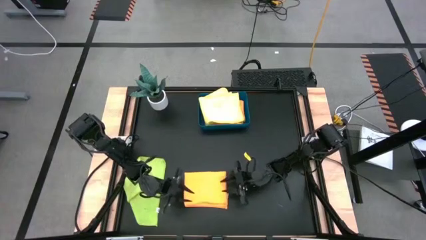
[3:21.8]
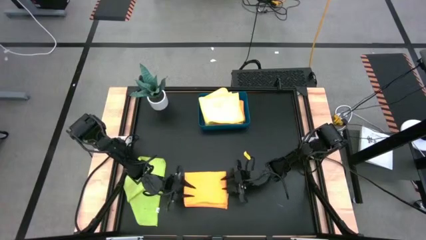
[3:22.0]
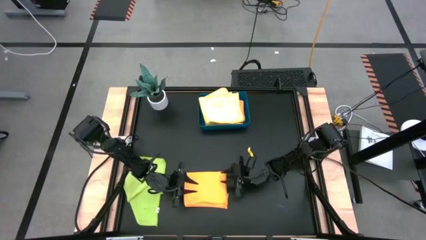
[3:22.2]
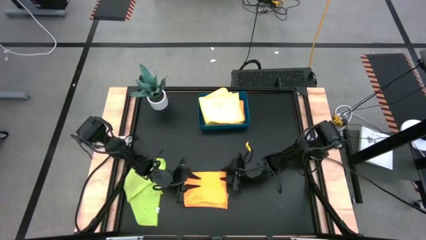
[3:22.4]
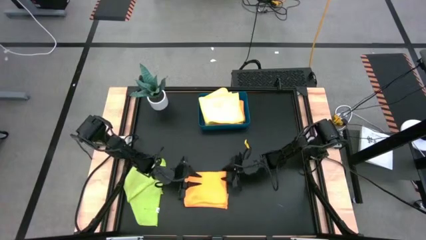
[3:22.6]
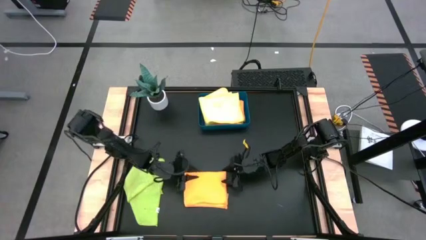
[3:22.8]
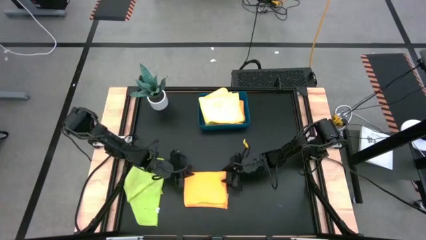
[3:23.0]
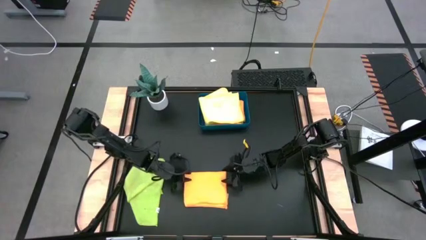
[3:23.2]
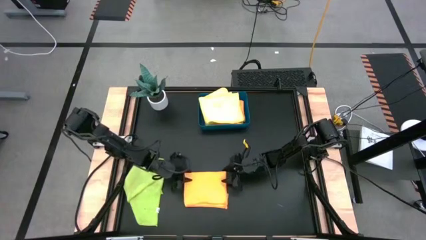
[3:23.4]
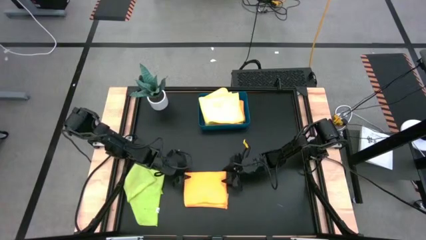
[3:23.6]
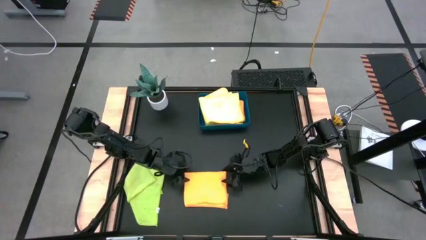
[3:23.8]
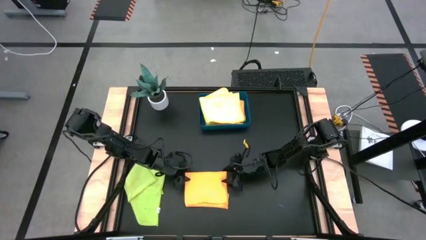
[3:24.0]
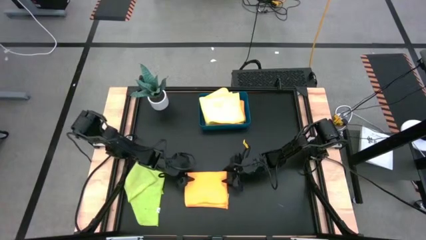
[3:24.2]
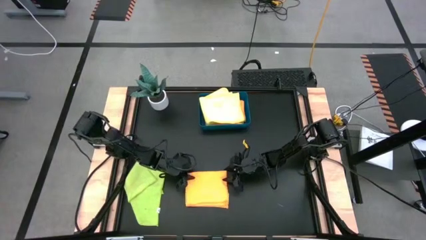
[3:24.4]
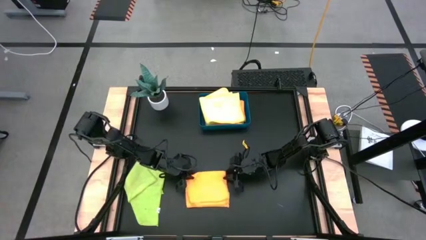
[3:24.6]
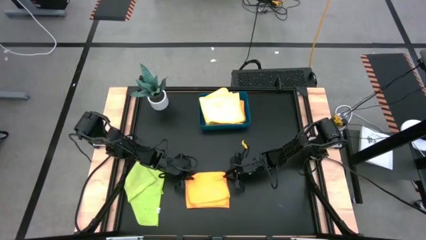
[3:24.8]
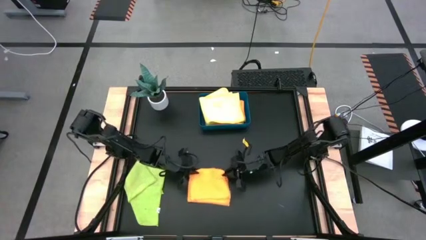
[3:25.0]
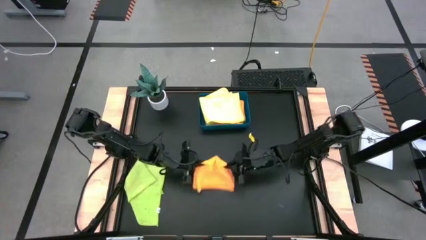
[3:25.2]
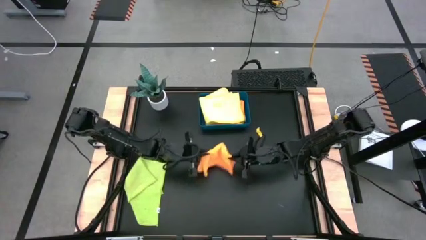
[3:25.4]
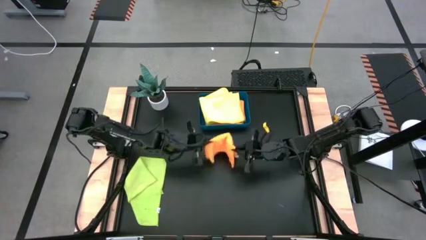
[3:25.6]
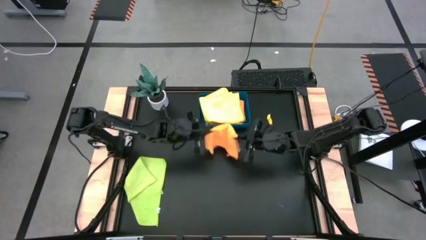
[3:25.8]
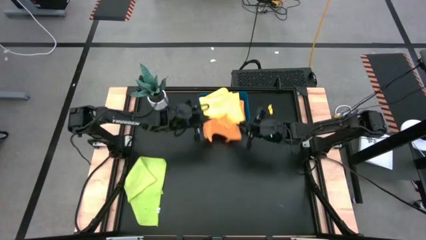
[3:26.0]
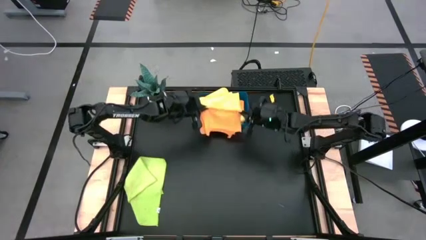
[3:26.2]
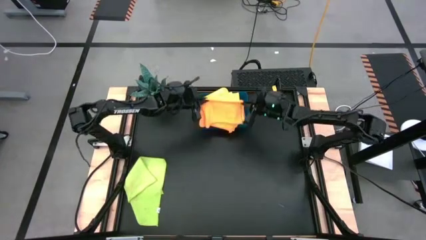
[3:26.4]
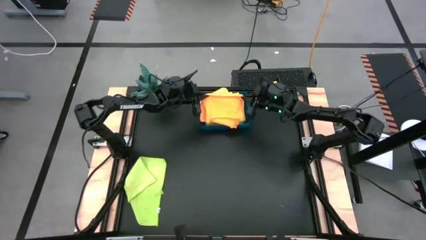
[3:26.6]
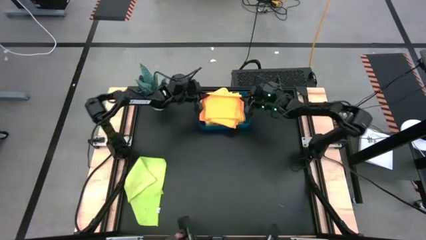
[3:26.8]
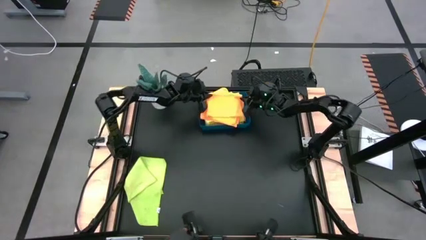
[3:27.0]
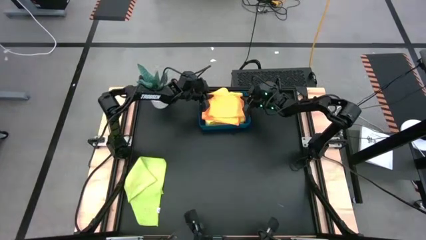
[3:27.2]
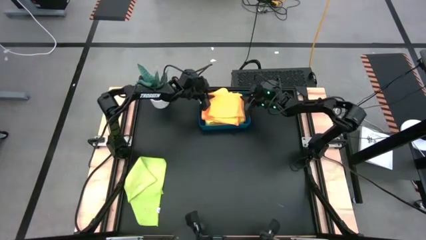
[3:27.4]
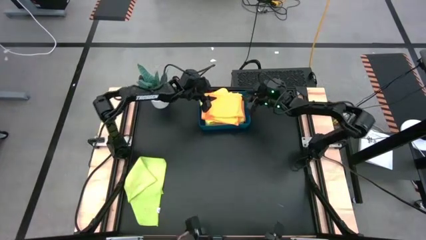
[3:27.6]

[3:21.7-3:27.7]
Task: Fold microfiber towels
Put the orange microfiber cloth into the blue bin

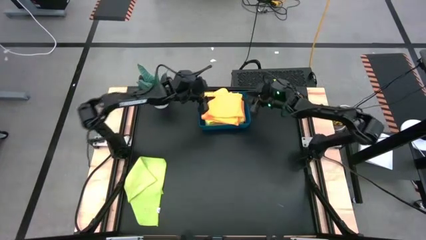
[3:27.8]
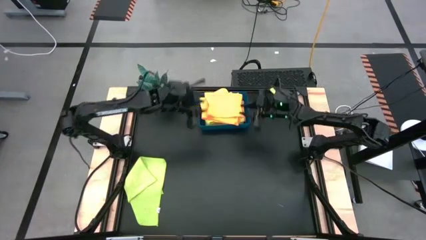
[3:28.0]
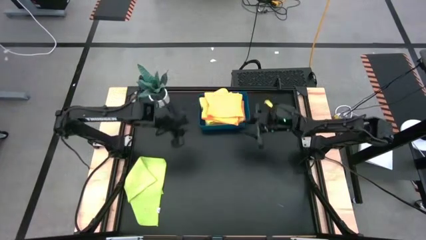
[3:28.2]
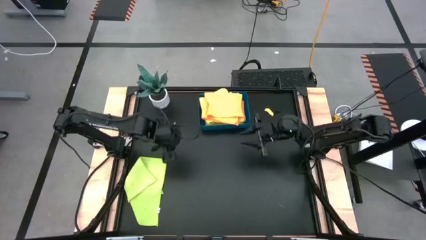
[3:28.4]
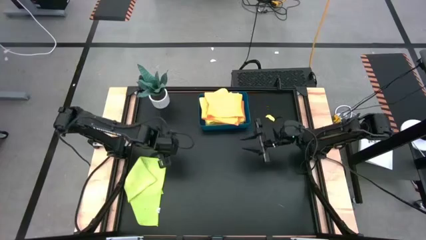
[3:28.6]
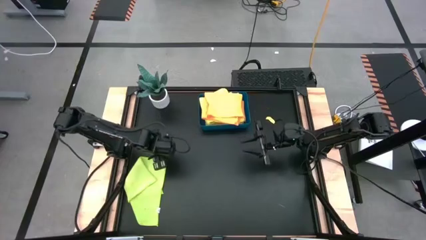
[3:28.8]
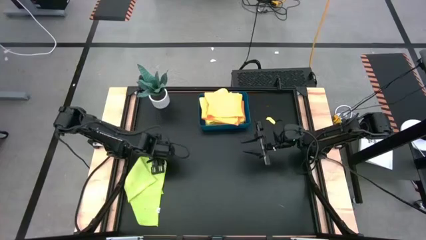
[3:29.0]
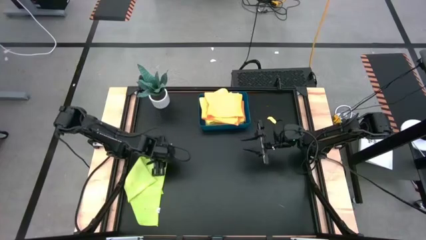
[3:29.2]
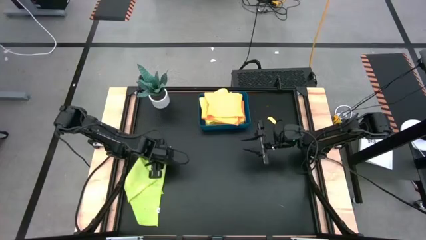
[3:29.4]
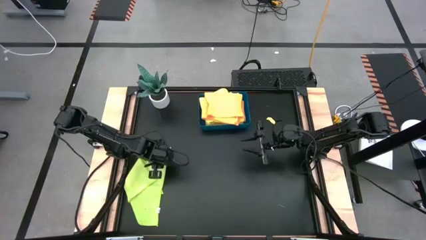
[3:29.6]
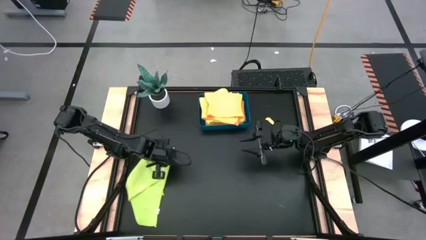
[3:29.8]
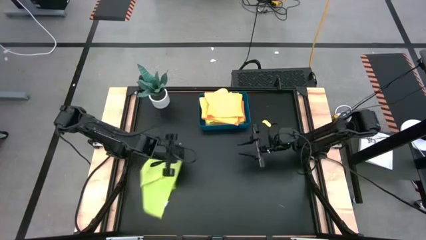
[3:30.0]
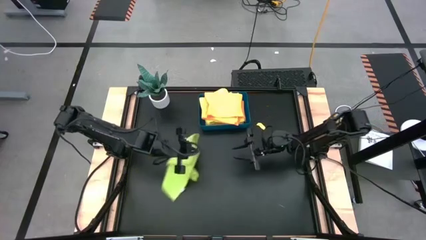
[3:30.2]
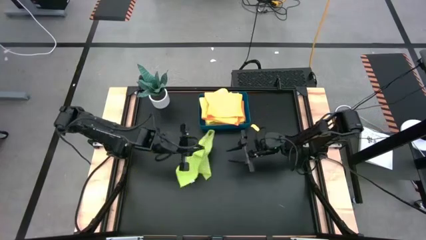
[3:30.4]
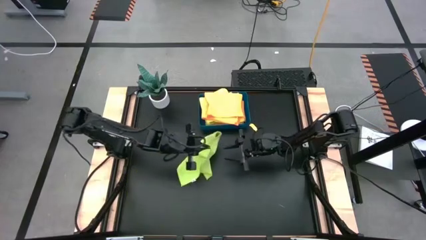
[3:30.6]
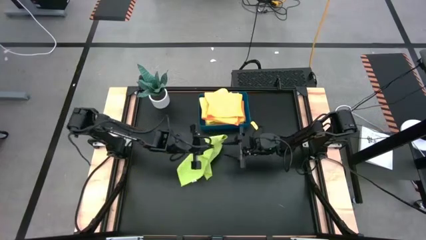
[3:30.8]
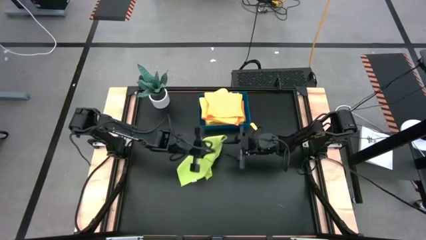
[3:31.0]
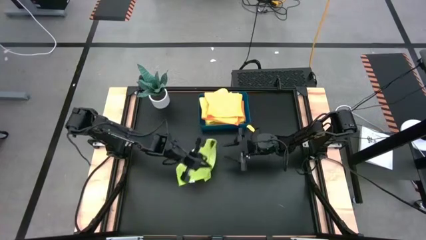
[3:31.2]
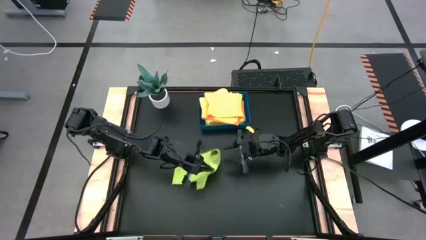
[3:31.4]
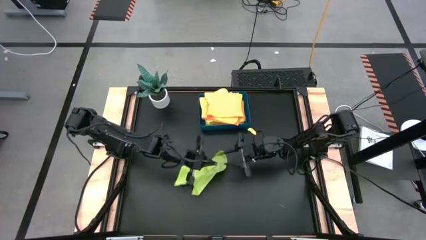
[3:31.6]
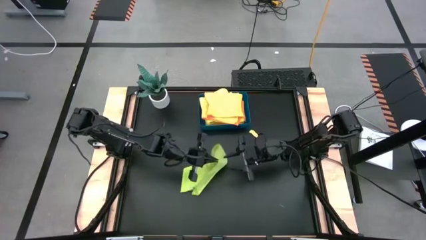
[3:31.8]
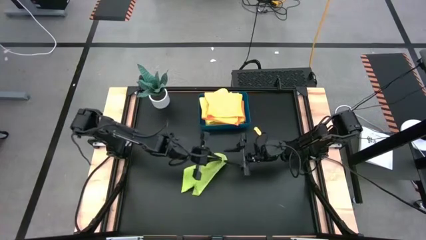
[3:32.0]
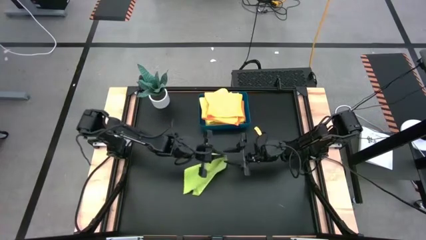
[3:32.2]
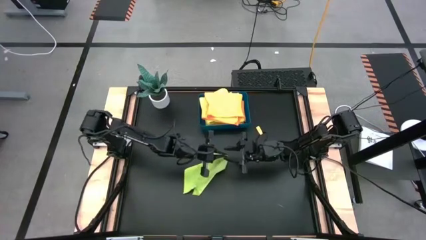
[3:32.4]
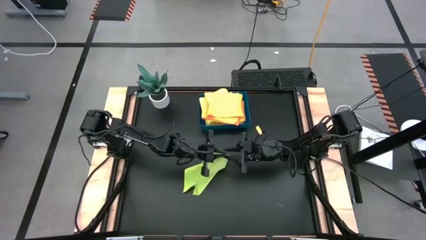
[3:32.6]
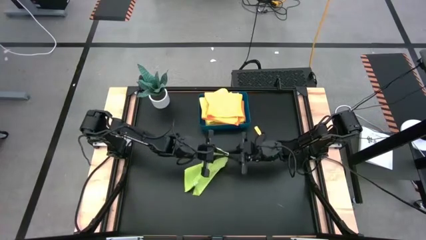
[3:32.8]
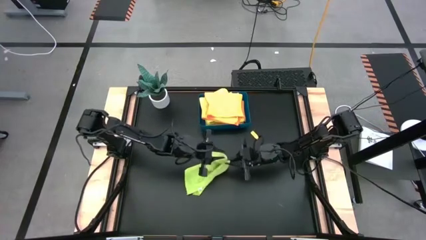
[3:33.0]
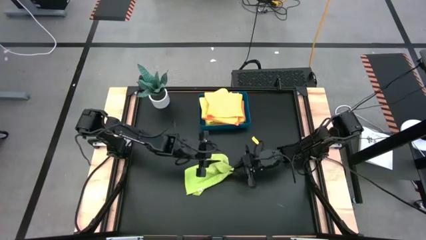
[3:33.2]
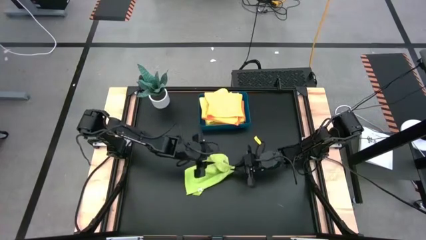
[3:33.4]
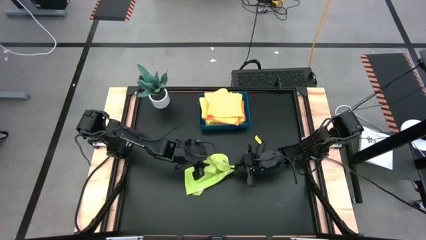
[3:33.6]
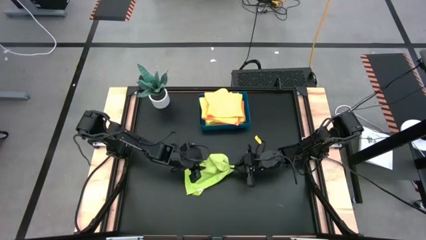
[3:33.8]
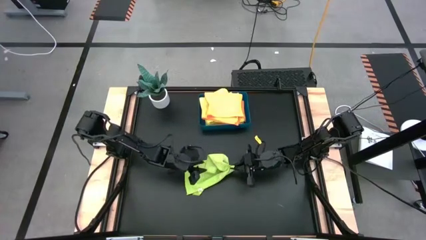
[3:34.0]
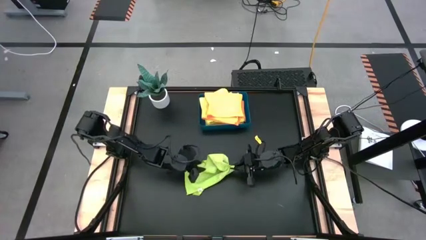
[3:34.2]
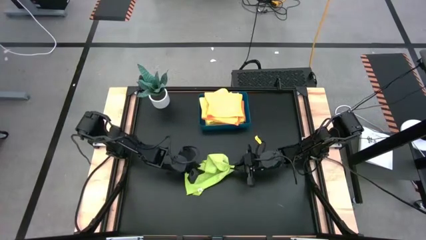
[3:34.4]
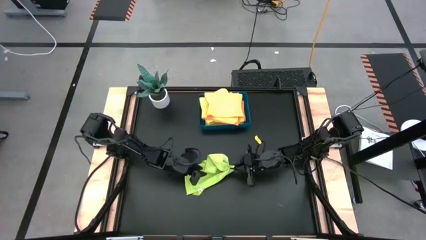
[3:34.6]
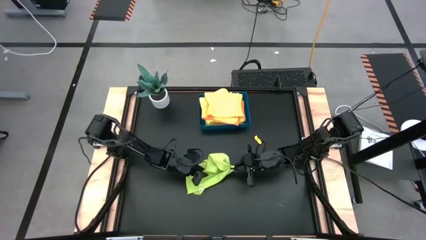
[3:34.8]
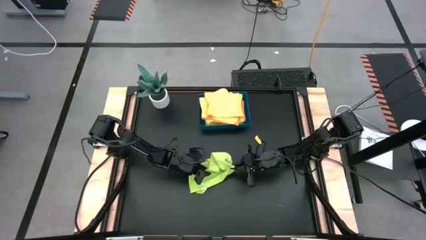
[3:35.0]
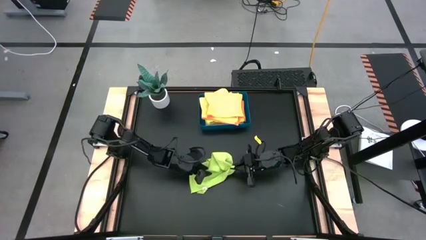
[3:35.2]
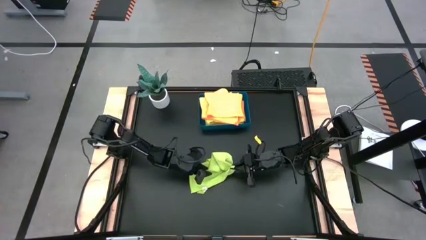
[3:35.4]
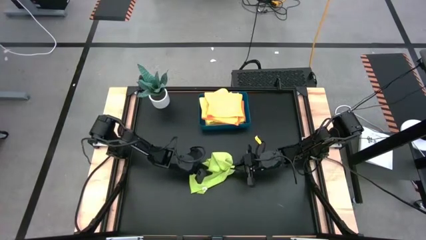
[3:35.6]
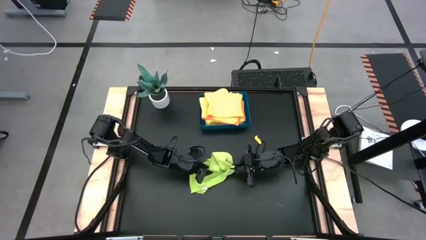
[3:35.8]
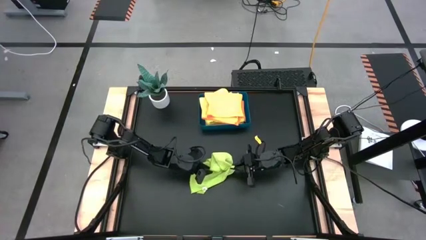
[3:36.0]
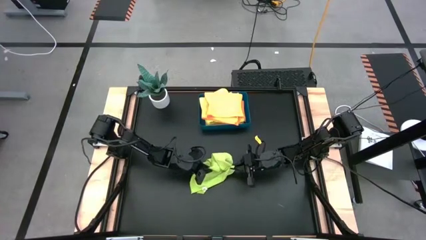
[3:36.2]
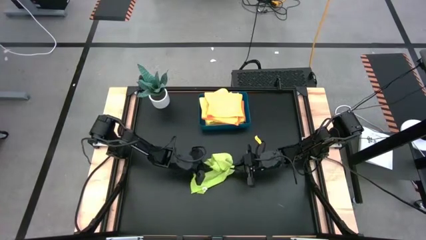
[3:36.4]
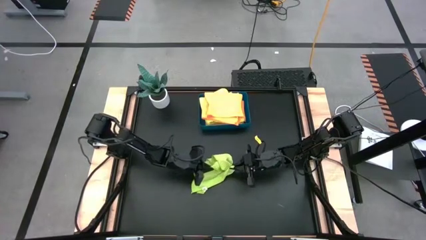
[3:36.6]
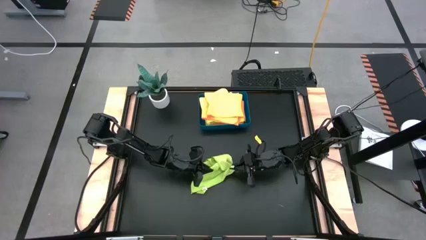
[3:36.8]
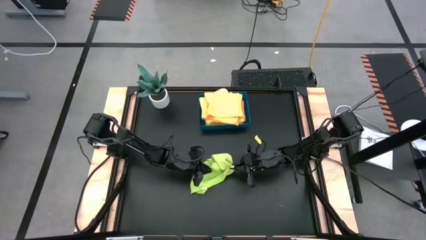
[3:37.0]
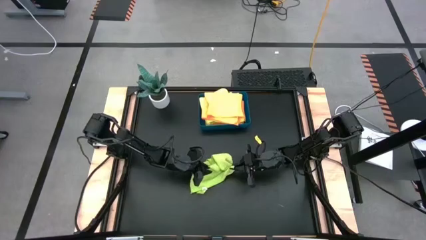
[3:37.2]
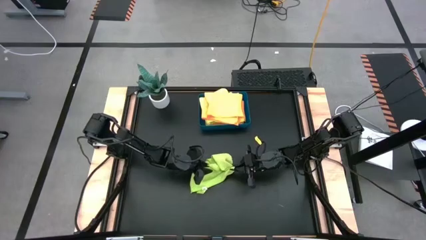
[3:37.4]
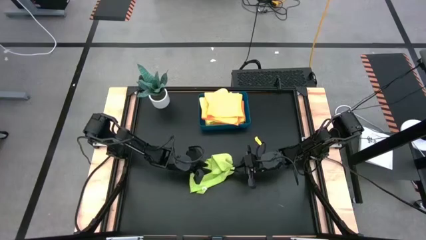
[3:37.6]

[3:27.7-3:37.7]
Fold the green microfiber cloth
